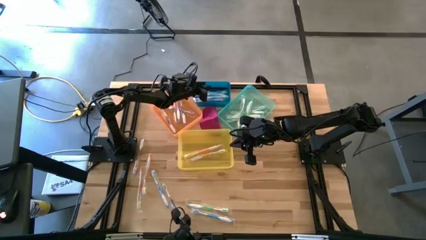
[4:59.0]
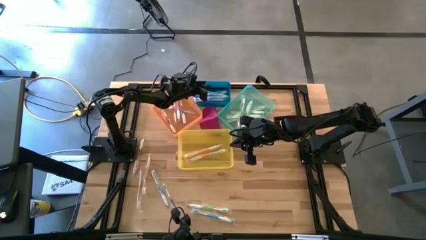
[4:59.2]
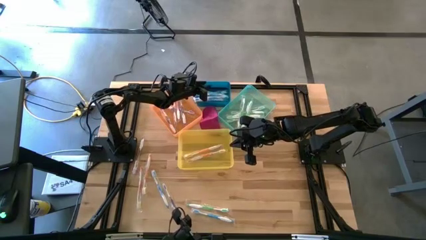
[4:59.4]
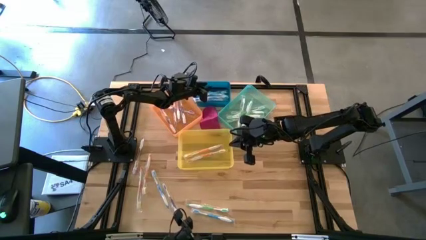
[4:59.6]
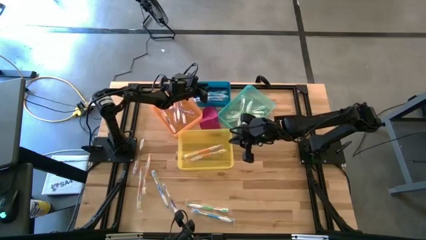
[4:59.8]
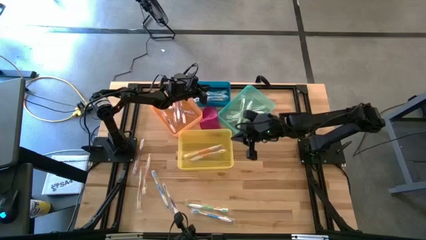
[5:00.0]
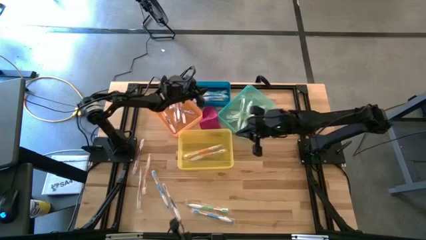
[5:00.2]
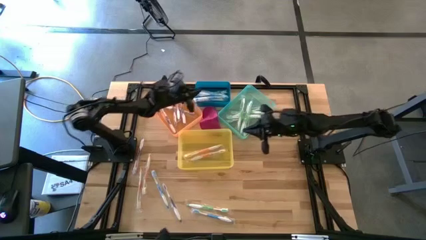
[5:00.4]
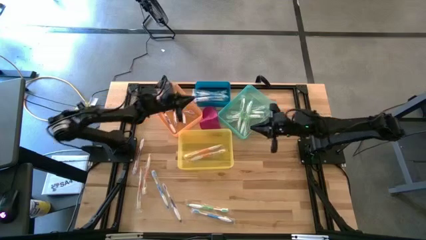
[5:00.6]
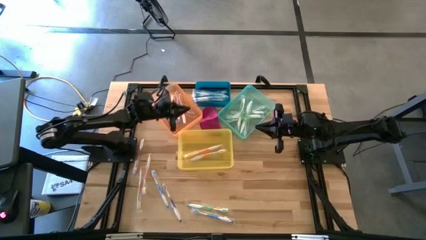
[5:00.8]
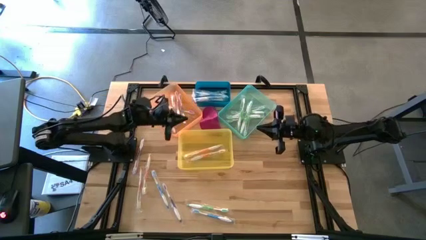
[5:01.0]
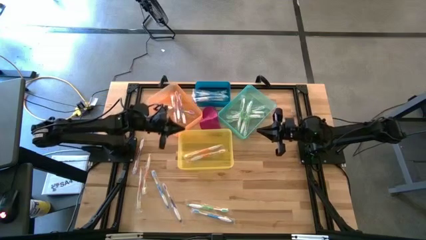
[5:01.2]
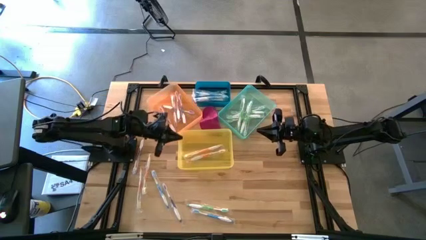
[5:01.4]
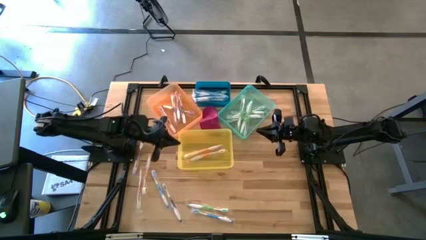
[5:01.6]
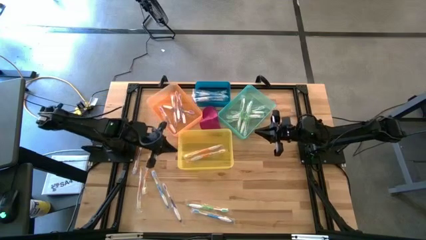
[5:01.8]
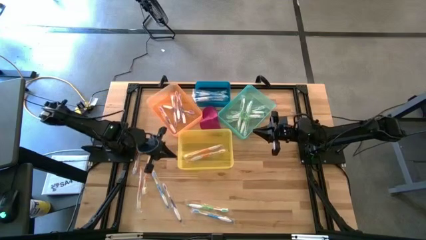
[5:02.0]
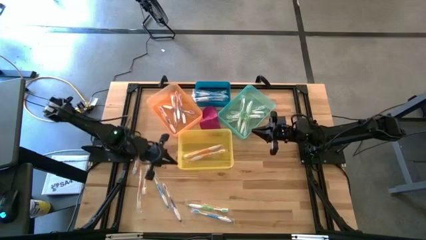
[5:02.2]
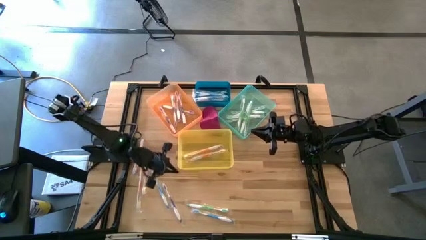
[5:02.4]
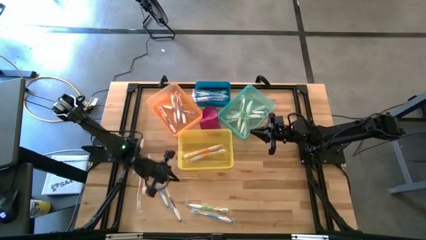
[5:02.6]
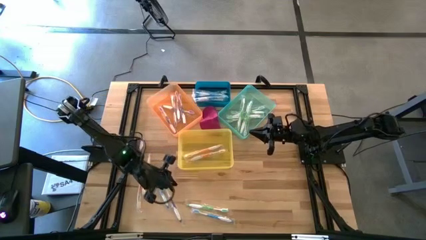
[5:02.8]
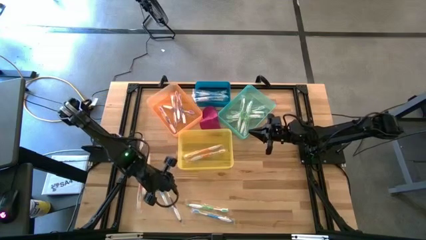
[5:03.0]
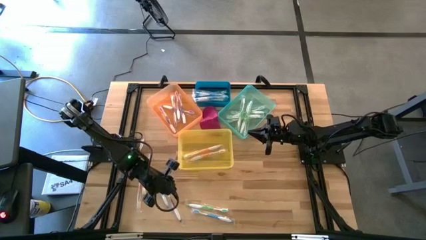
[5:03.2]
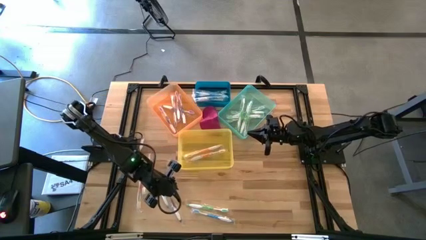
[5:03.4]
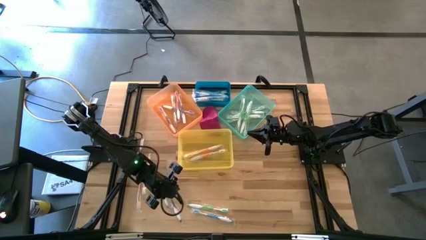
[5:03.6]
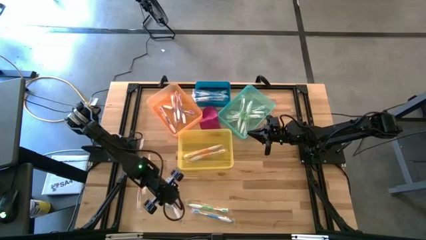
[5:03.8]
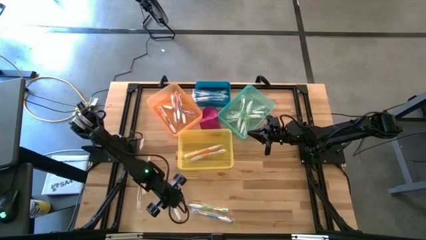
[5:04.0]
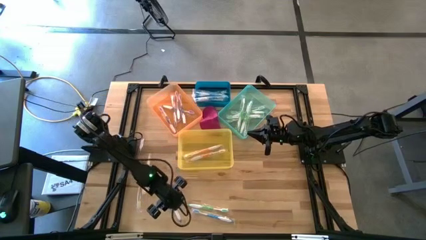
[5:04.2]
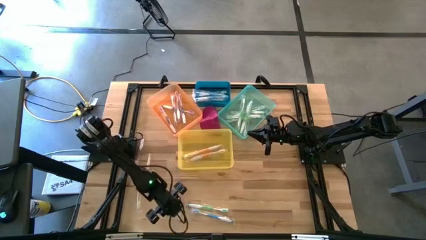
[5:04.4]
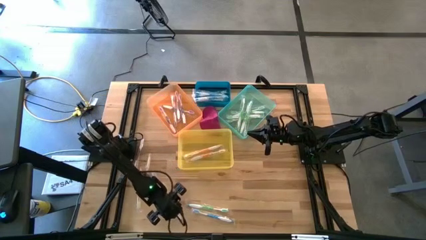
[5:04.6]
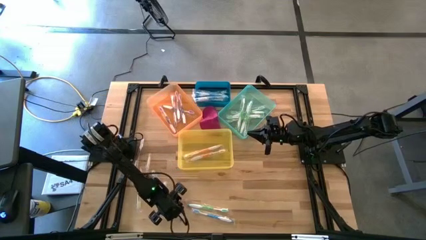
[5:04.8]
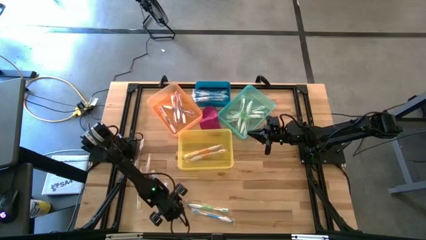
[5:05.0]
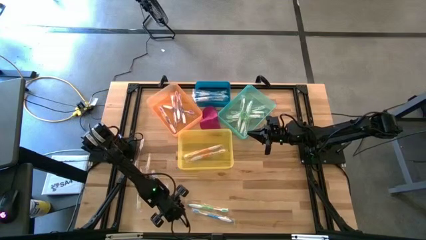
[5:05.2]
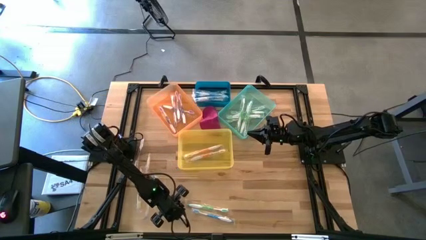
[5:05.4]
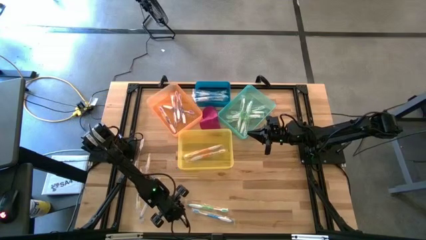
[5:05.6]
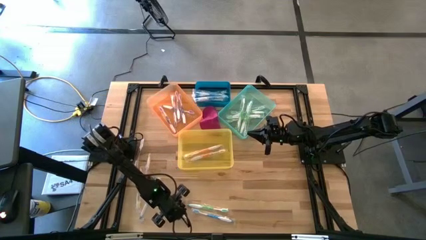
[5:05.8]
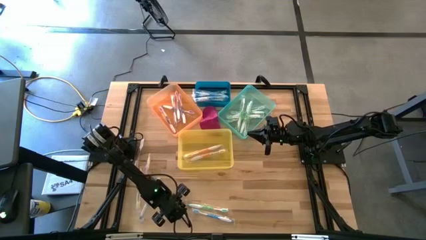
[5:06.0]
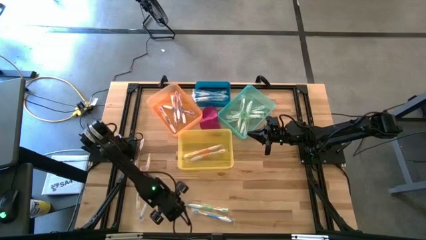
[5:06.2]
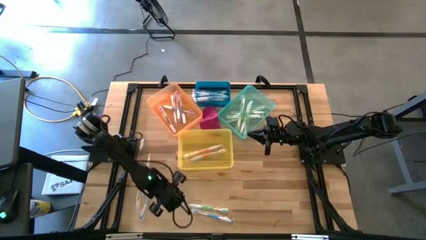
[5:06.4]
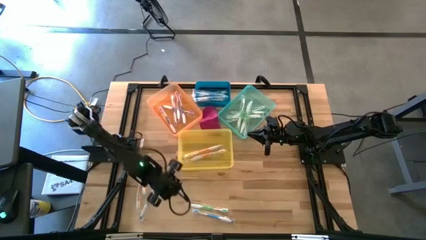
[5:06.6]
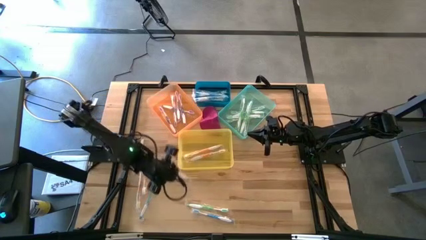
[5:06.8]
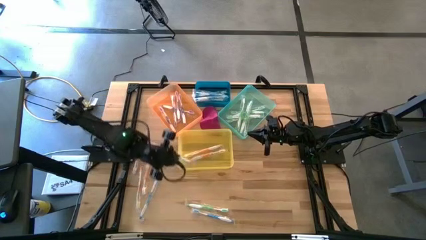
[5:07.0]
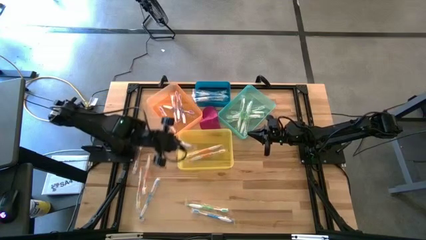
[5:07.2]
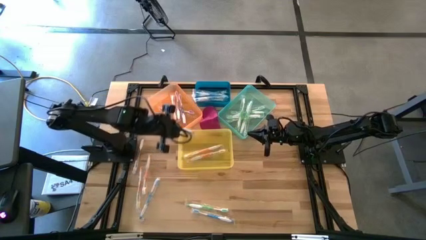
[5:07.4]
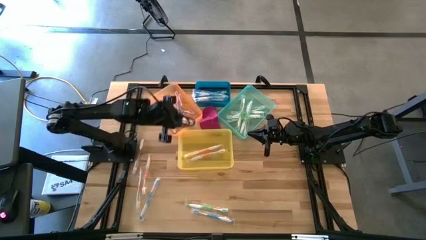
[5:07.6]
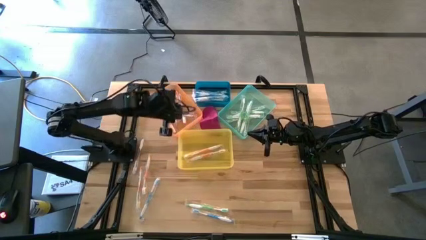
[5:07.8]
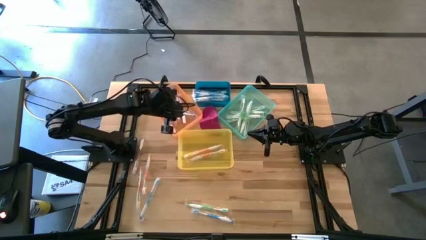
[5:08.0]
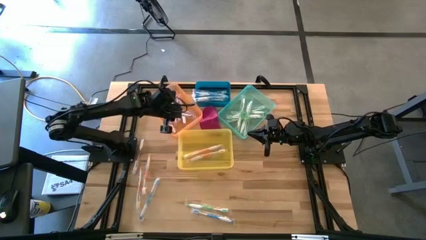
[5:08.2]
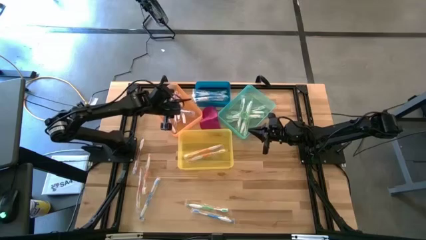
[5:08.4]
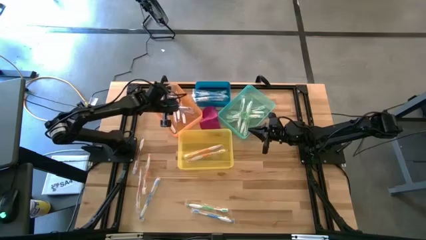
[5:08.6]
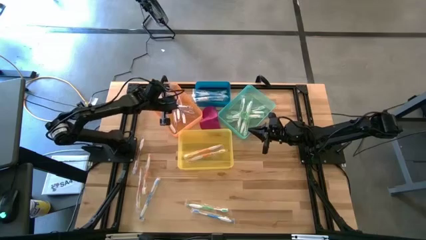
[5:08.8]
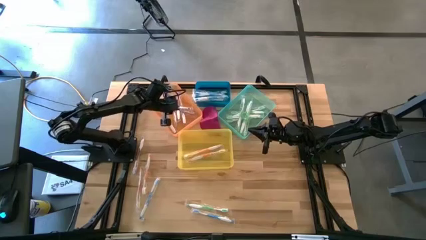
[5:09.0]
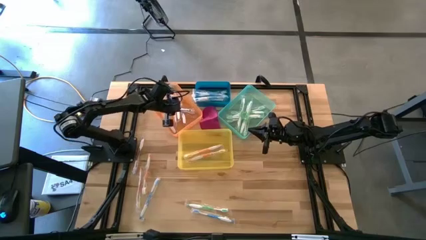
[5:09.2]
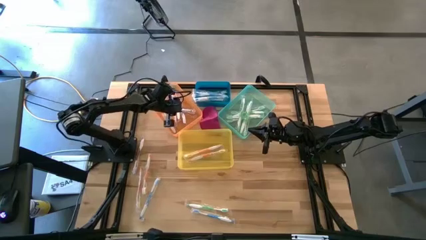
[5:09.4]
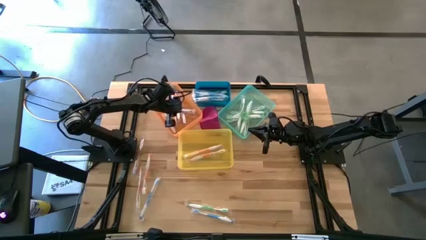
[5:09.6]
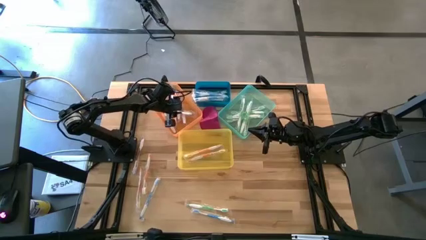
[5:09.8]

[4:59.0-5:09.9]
Task: Pick & Place Toothbrushes
Put the purple toothbrush into the orange bin
